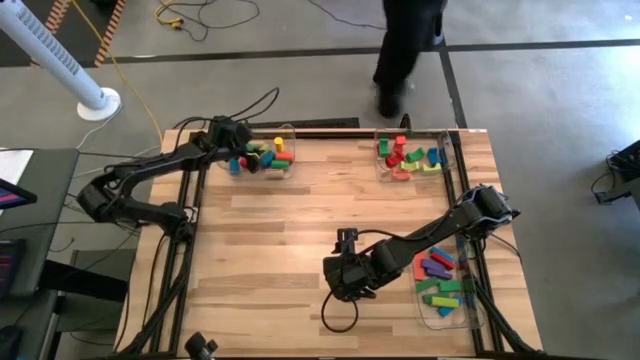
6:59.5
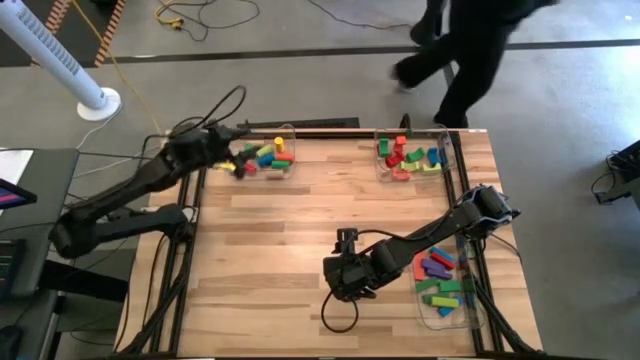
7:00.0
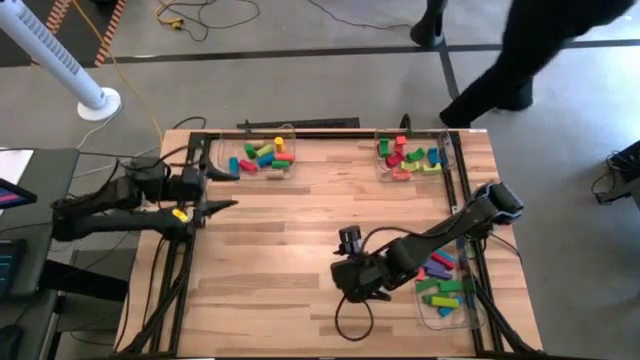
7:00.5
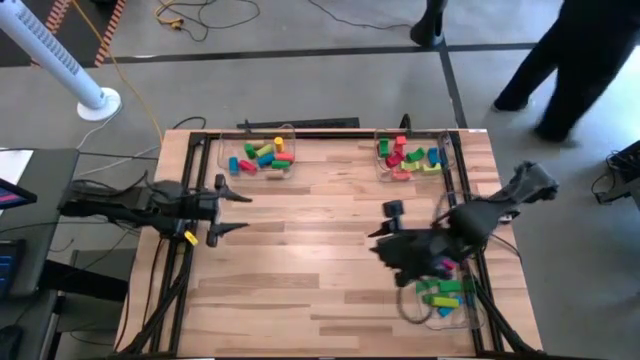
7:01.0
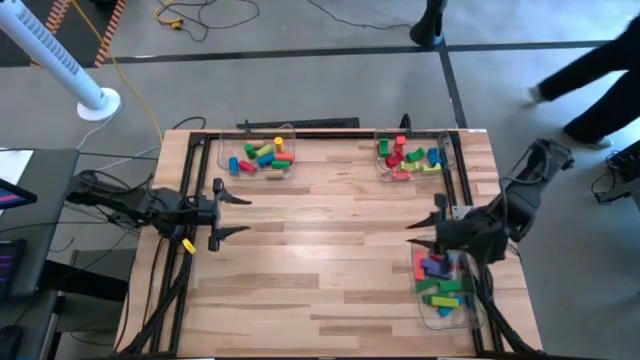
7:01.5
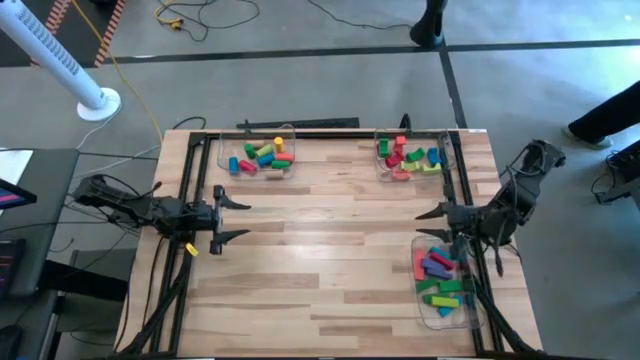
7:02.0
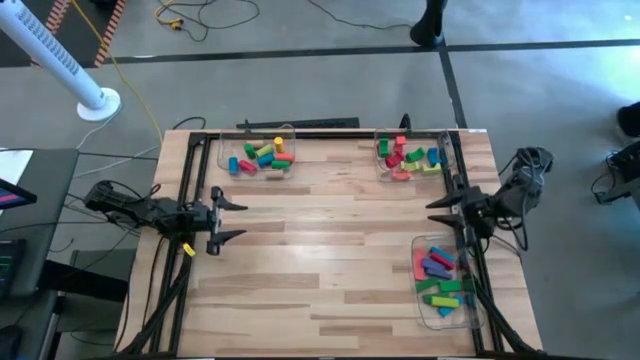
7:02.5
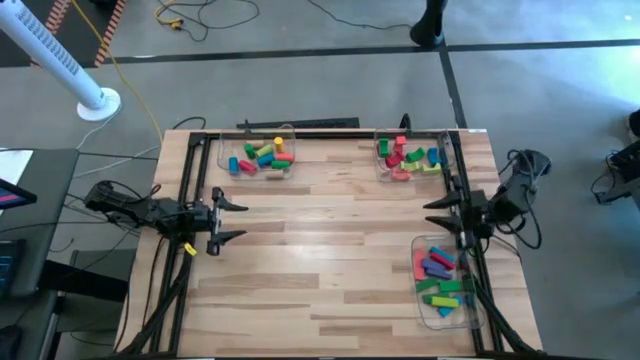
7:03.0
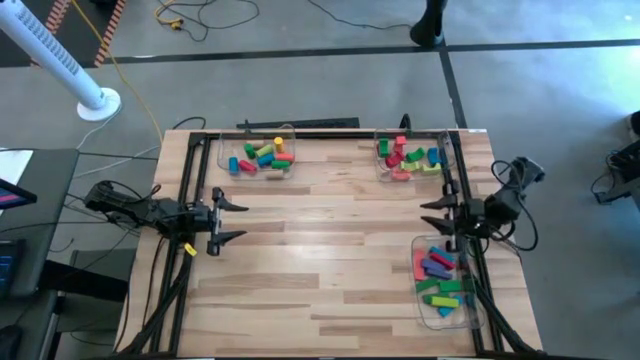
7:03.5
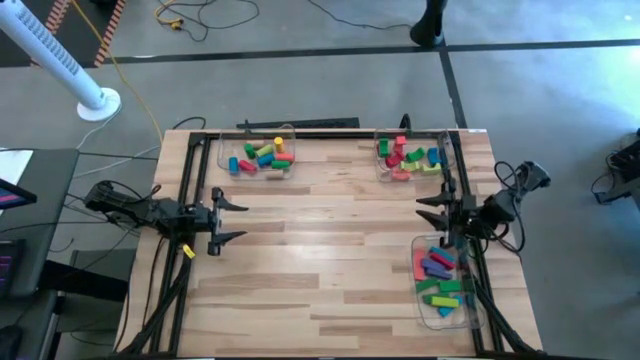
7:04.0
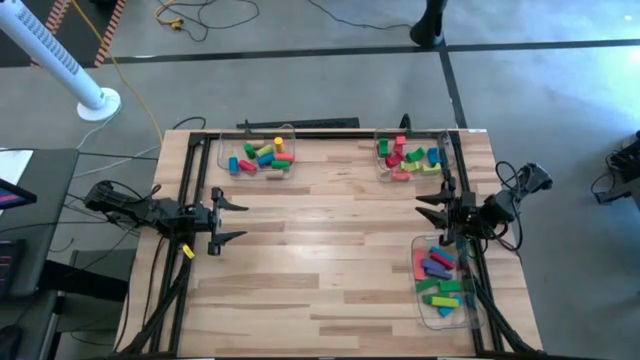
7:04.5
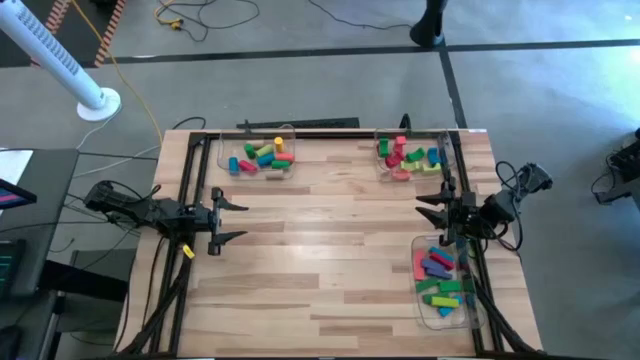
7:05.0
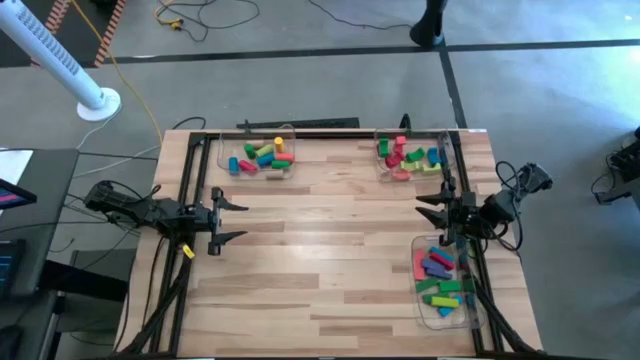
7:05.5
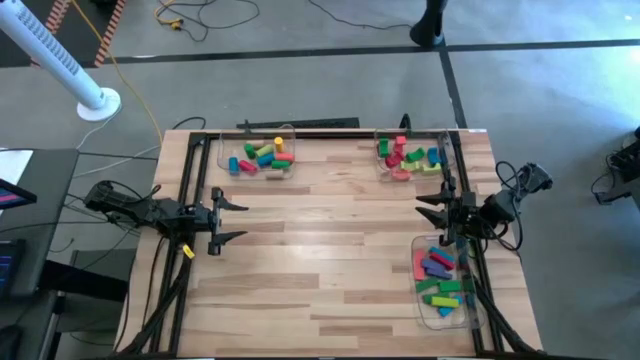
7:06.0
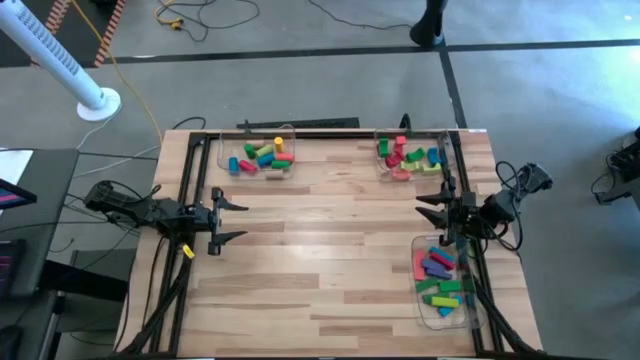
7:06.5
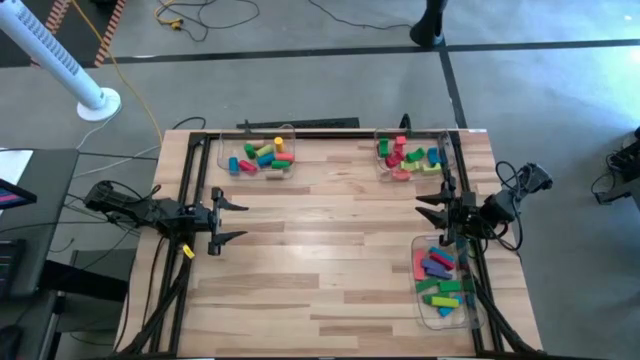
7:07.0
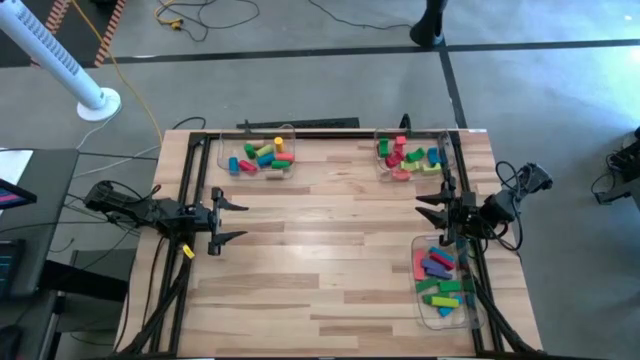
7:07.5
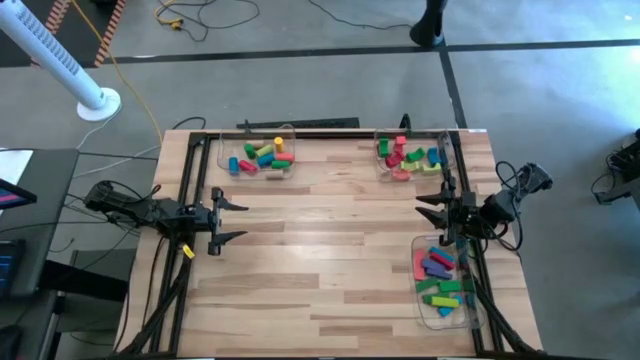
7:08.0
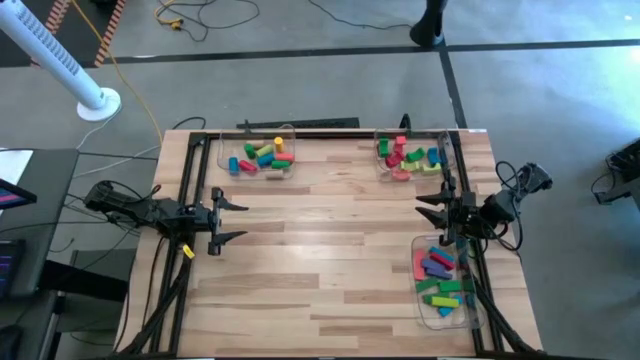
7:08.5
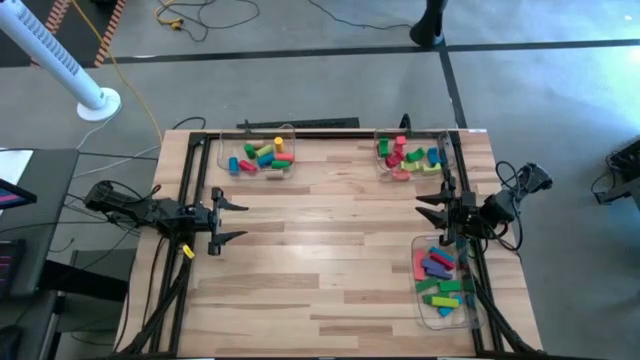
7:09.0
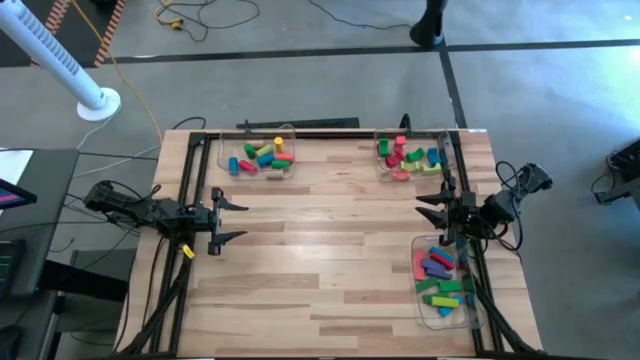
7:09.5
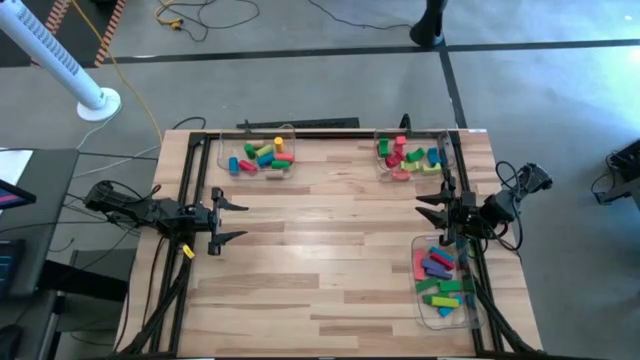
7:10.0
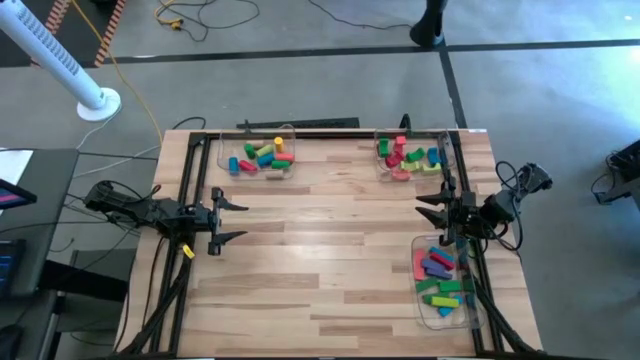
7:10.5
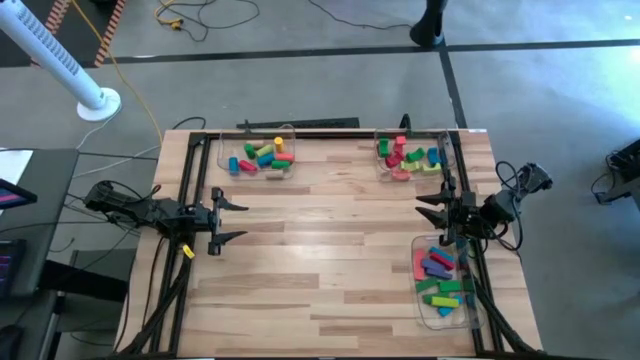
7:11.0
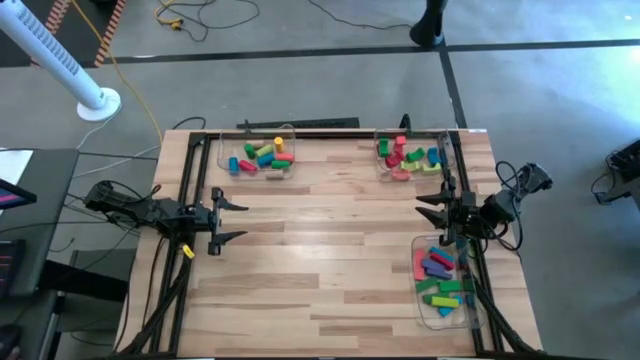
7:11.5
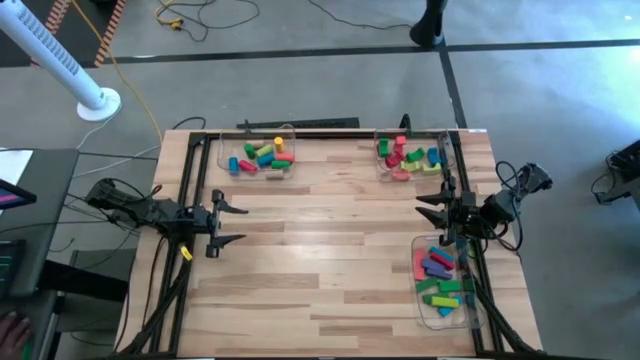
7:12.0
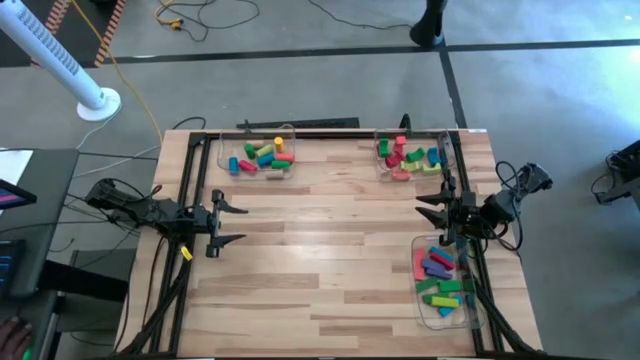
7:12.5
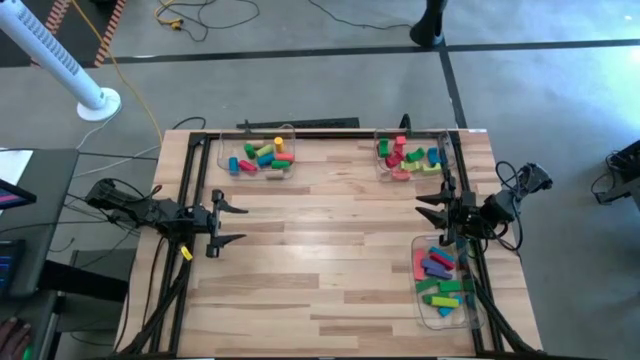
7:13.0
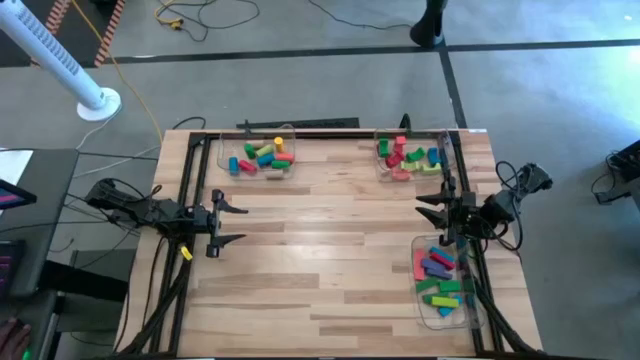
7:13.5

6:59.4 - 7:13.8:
Task: Sort blocks by size
Return to Home Position

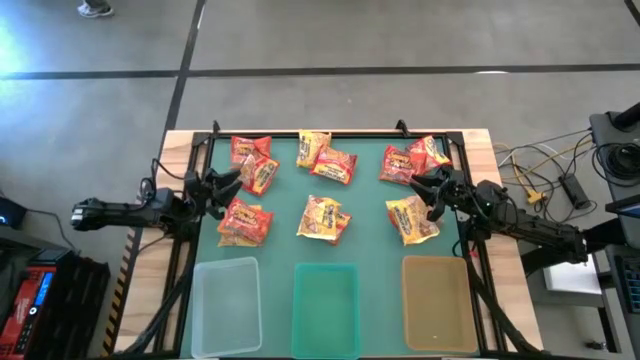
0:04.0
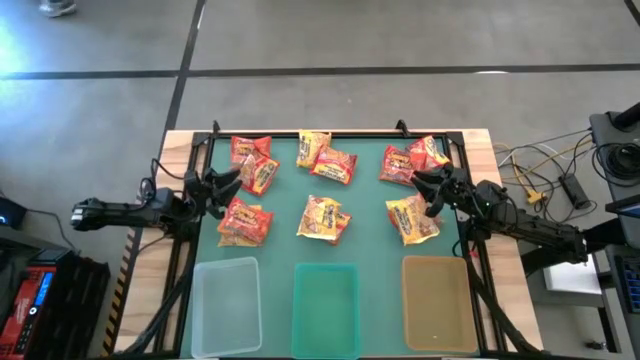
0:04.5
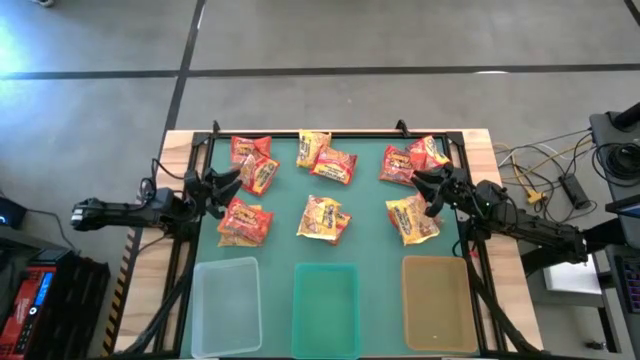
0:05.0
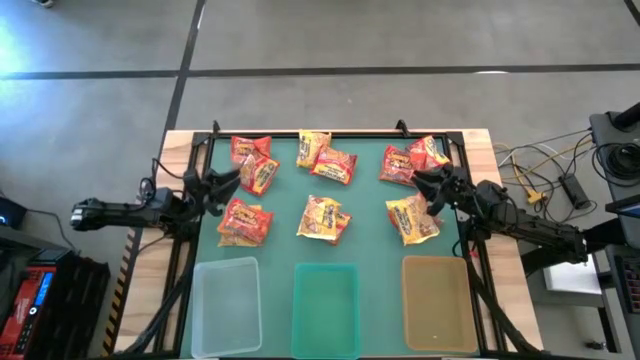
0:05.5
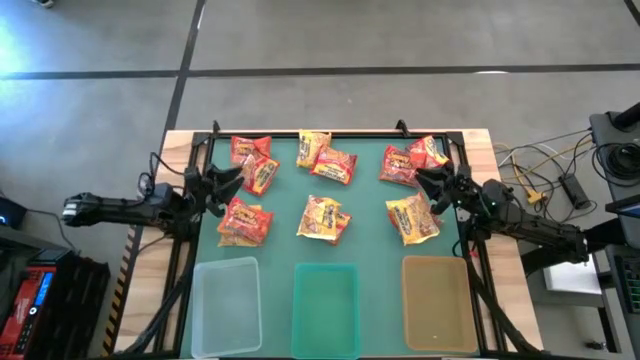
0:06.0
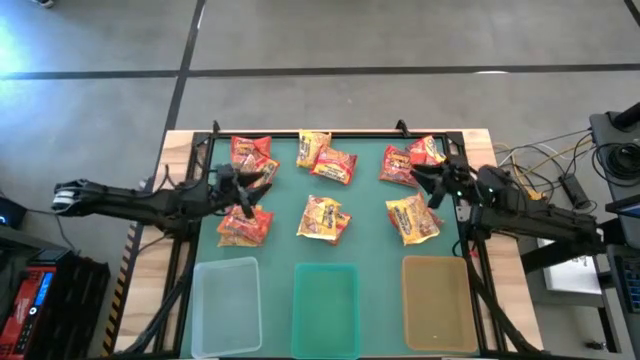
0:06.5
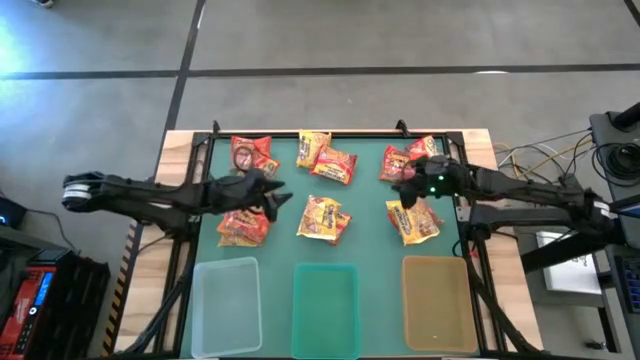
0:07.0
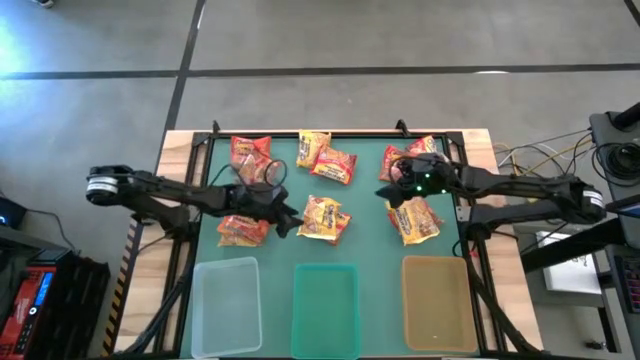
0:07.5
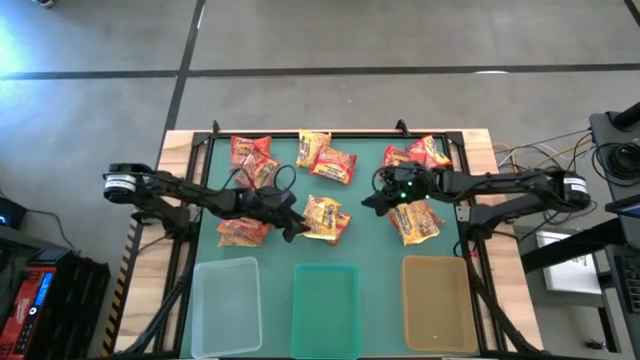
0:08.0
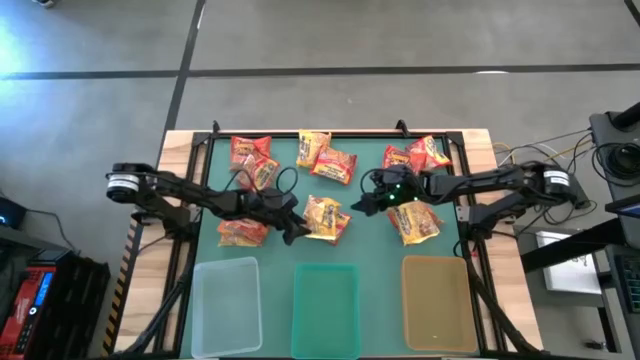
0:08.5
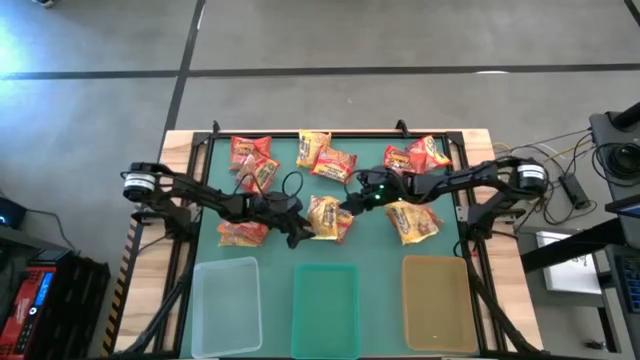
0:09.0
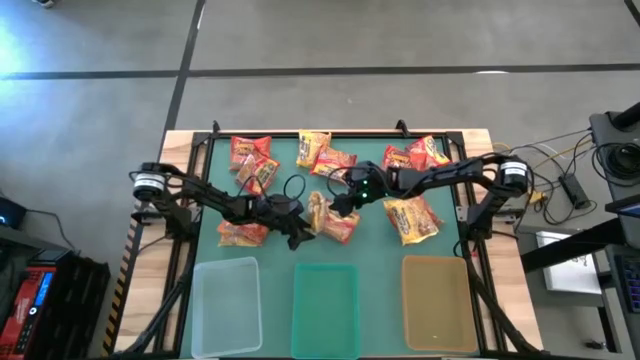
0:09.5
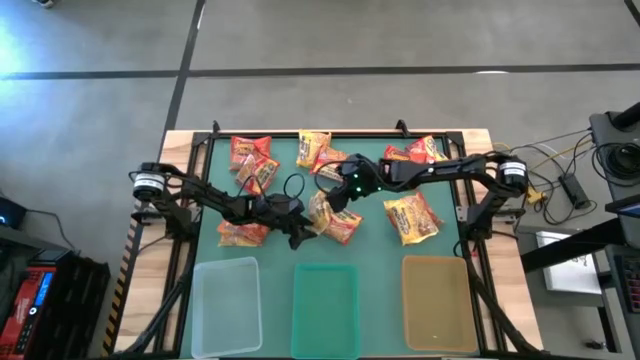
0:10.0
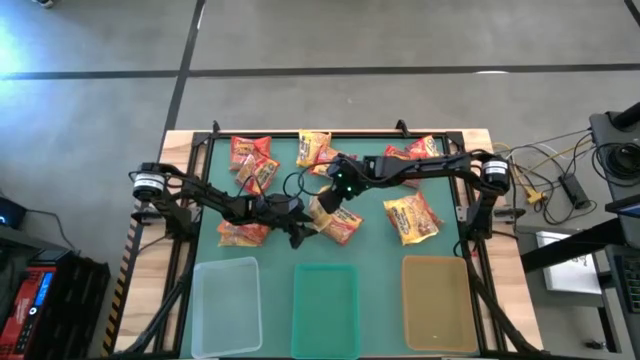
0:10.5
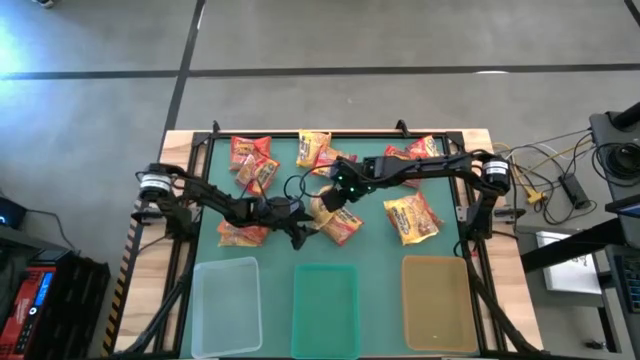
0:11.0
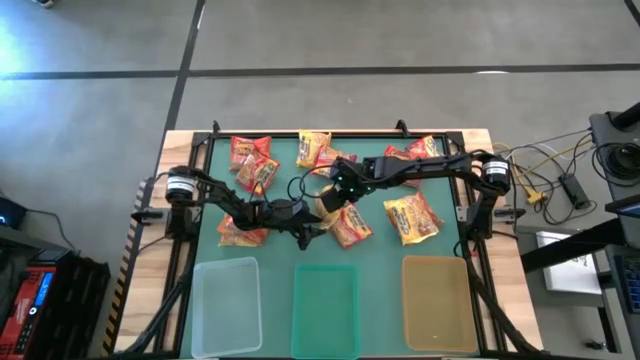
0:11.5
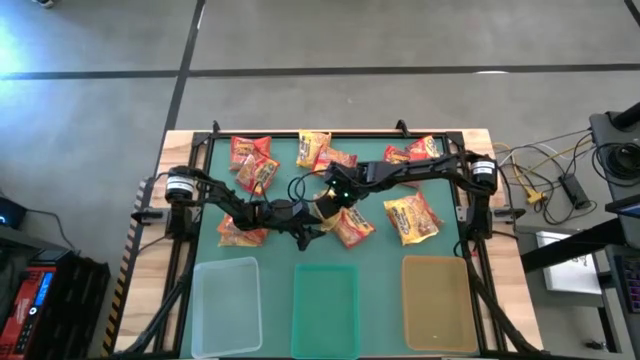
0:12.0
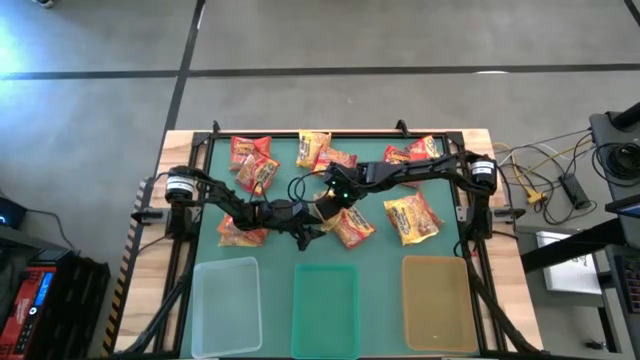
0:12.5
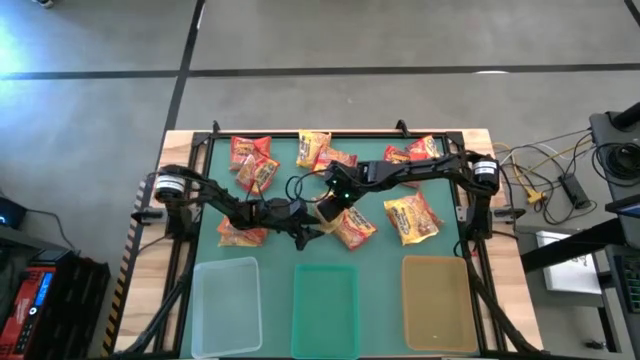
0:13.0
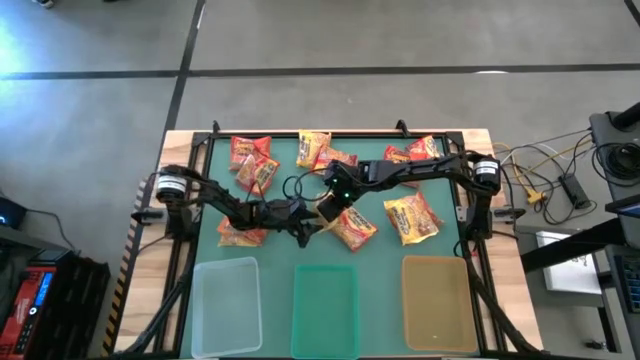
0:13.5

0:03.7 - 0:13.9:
Task: Sort Maruchan noodles
Put the yellow noodle pack into the orange bin
